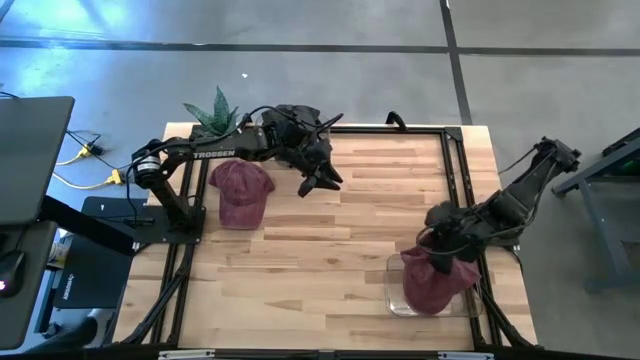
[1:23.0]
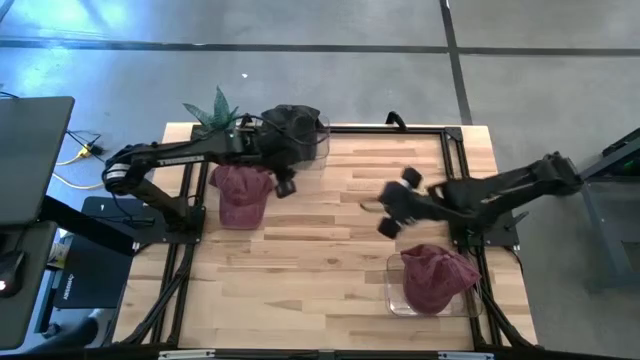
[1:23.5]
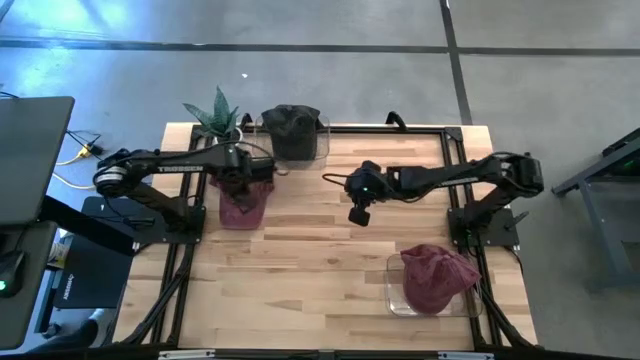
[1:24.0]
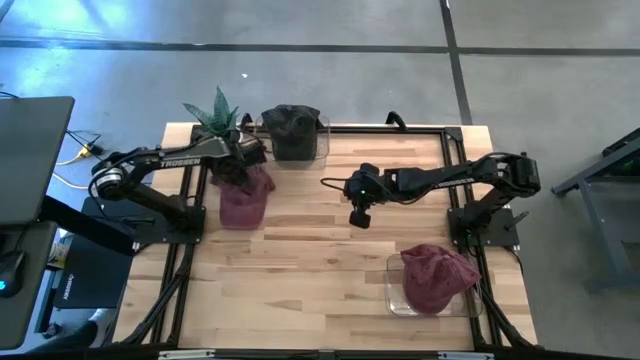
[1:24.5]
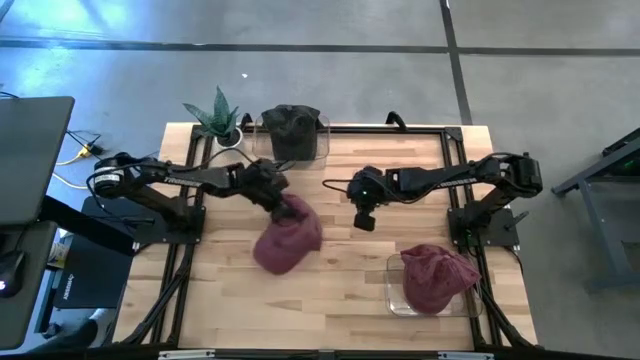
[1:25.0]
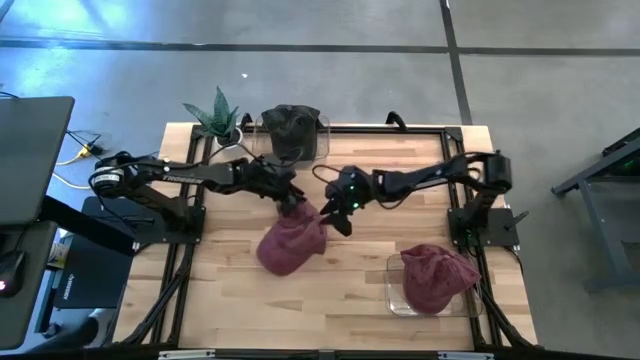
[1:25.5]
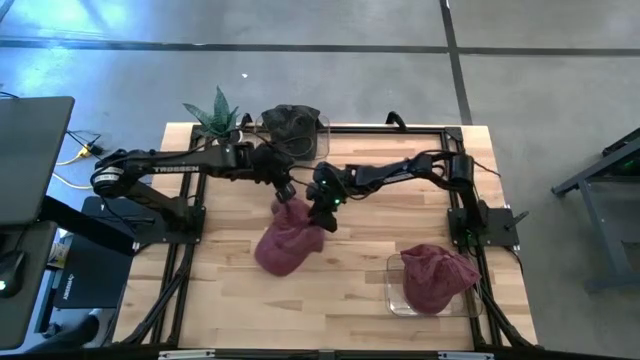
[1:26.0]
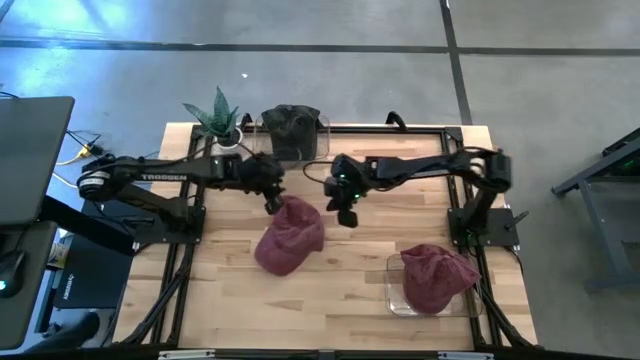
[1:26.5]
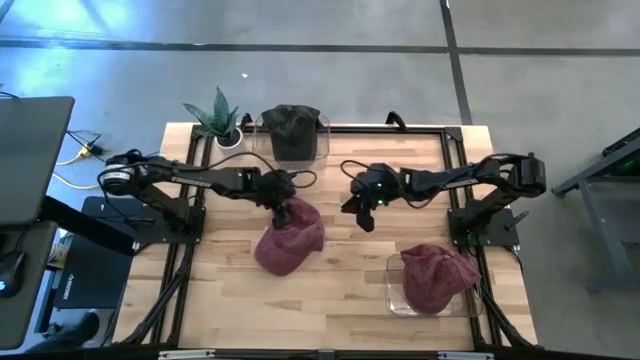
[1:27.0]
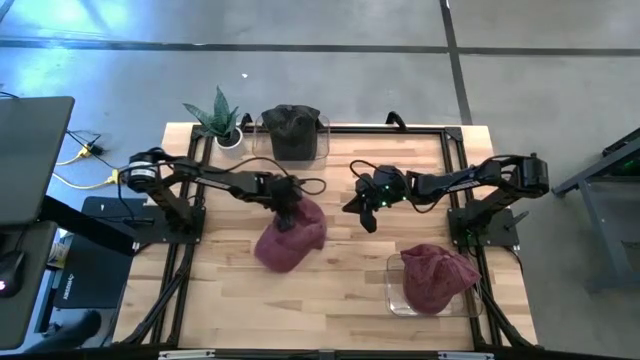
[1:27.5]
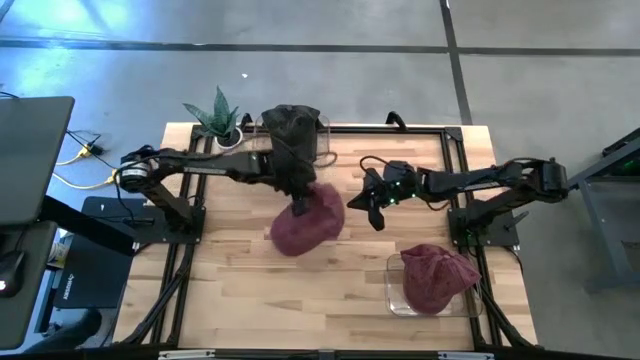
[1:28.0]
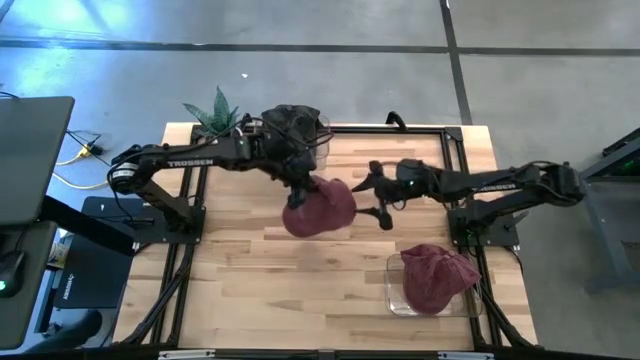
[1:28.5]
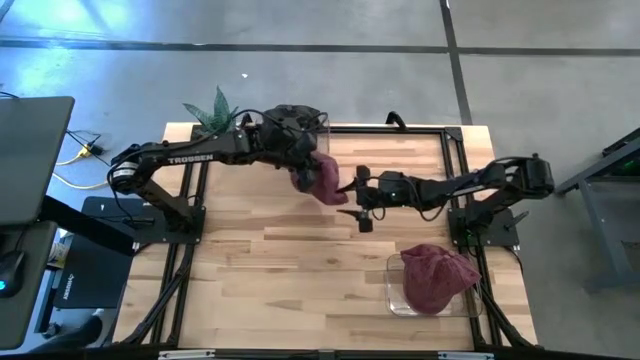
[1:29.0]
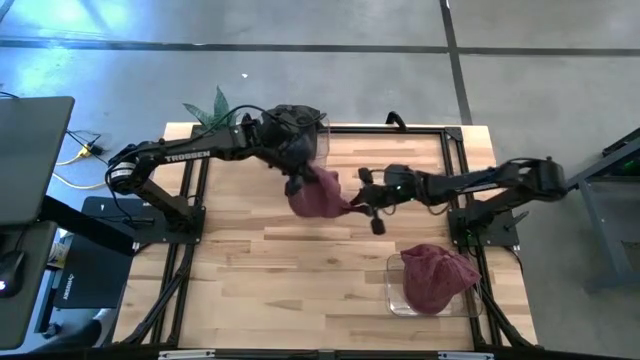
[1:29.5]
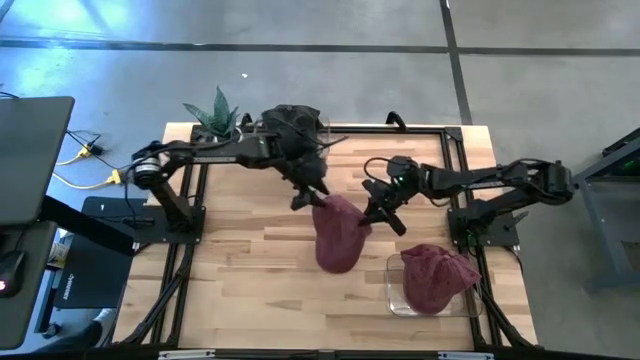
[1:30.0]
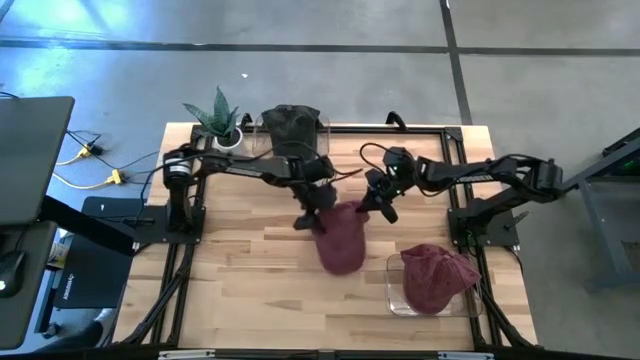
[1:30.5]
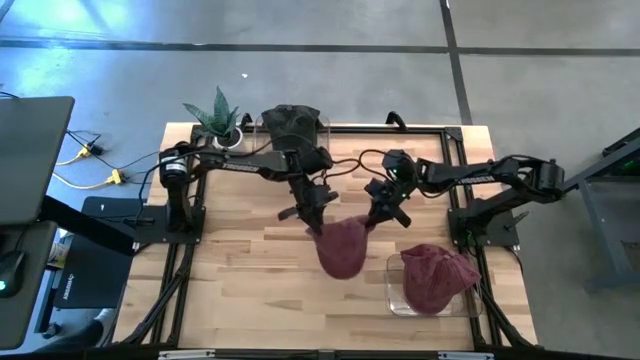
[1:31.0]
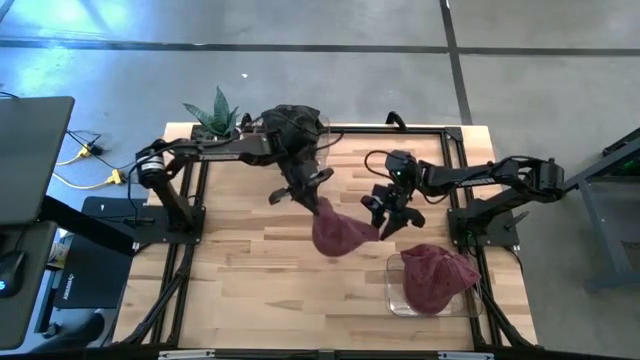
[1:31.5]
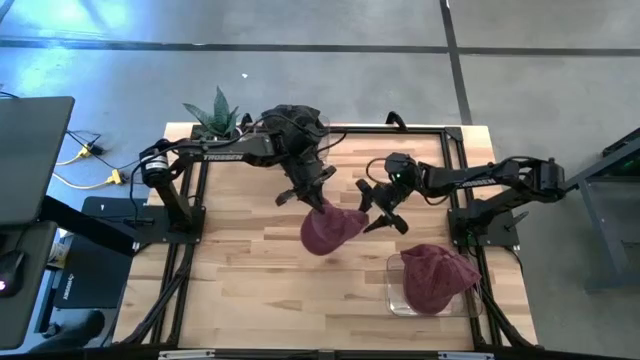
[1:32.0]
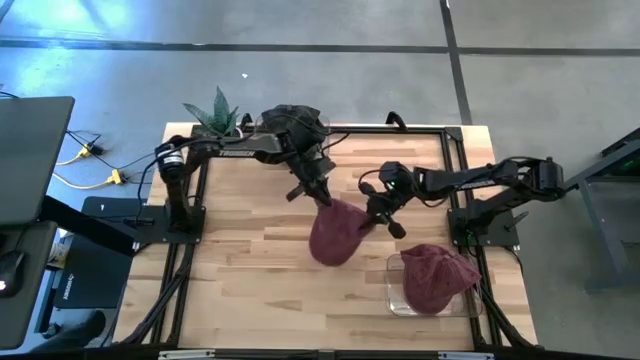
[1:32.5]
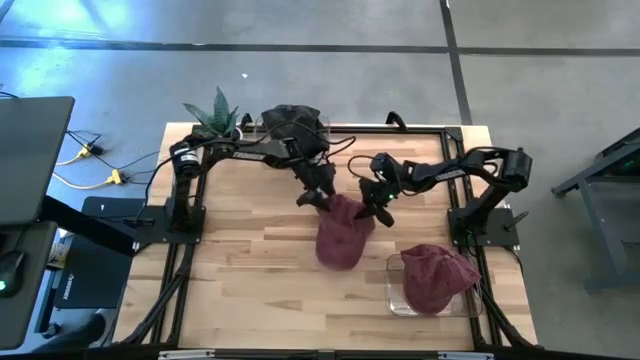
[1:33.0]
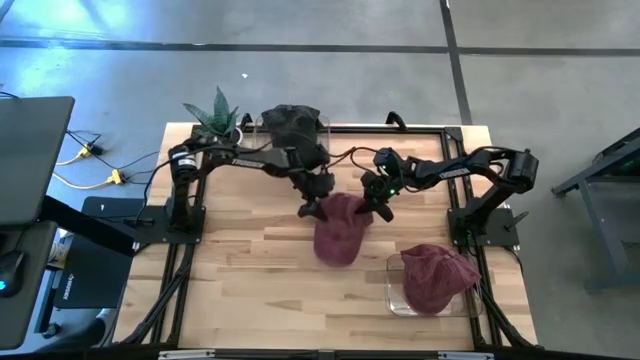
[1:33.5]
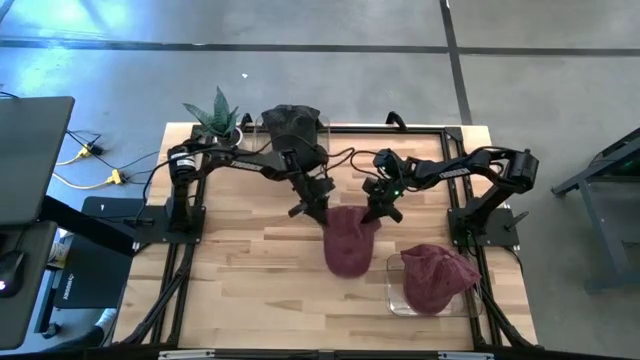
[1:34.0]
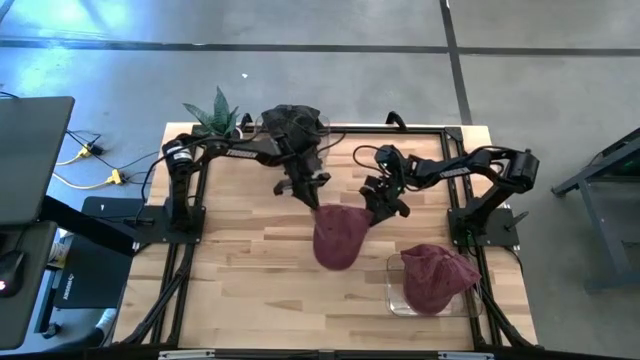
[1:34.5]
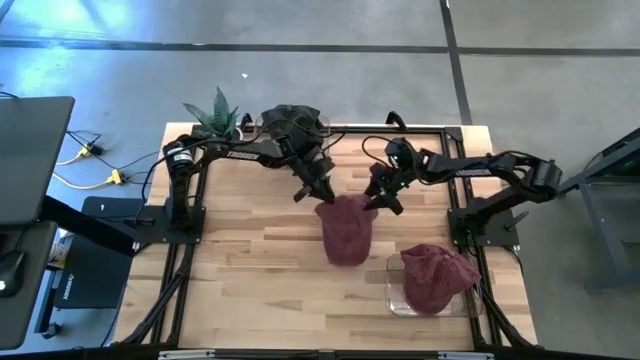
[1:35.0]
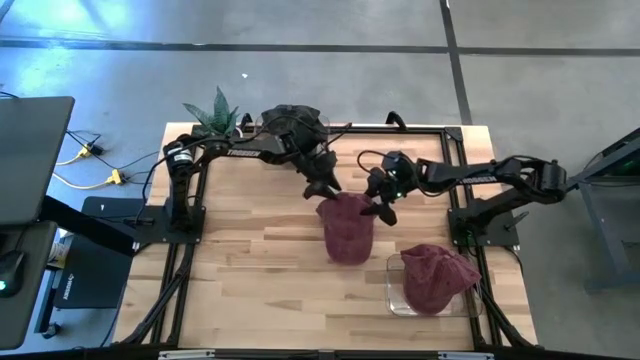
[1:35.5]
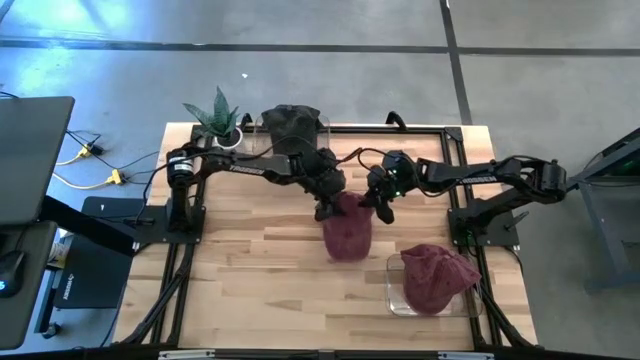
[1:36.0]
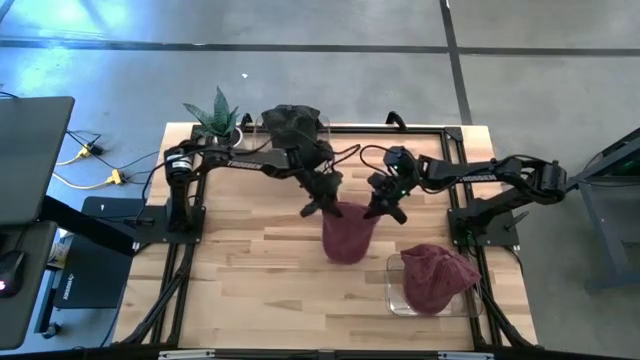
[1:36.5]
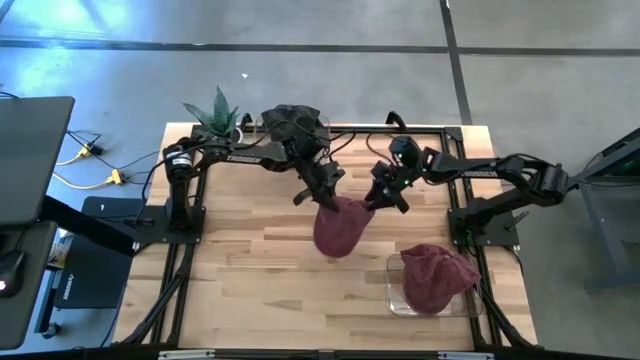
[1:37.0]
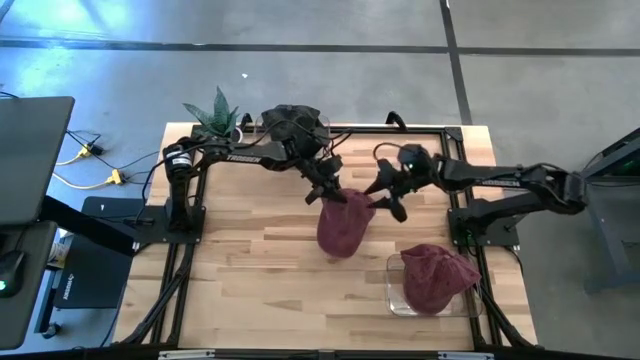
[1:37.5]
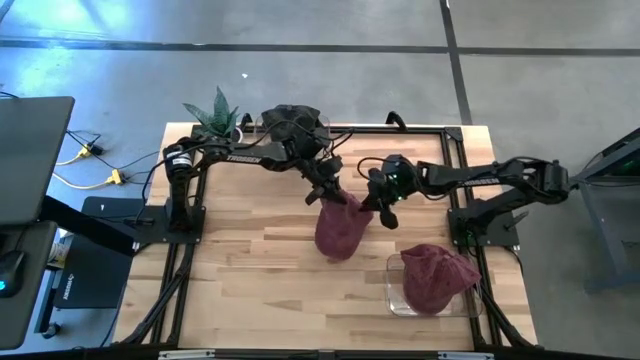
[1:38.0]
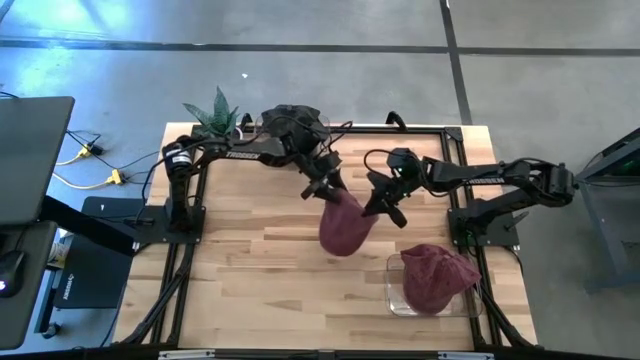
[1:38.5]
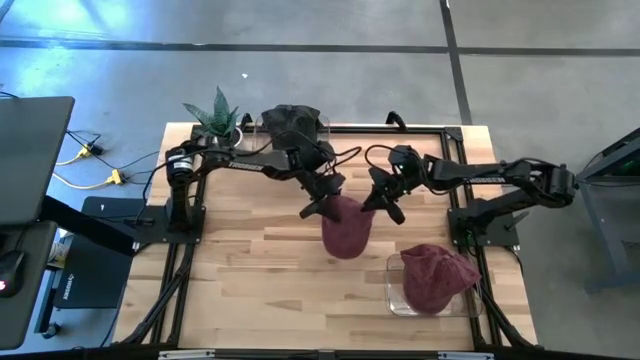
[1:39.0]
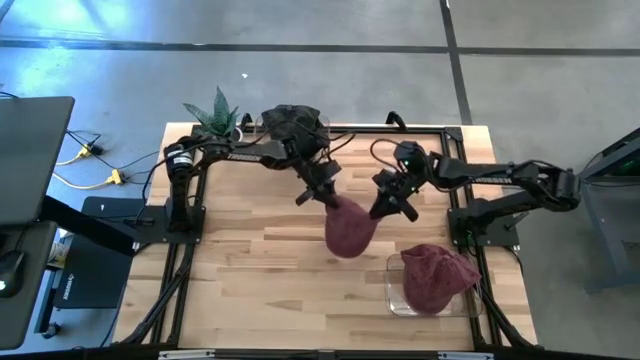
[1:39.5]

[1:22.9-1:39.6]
Task: Pick & Place hat
Put the red cap into the bottom transparent bin
